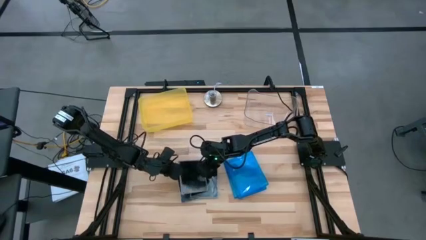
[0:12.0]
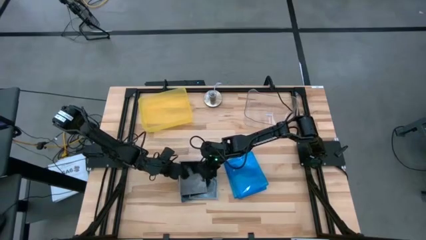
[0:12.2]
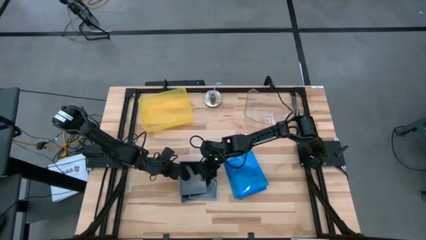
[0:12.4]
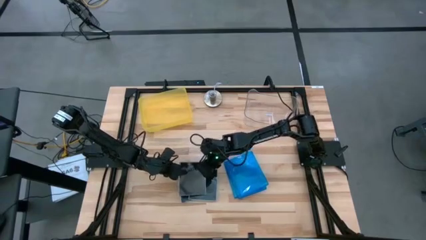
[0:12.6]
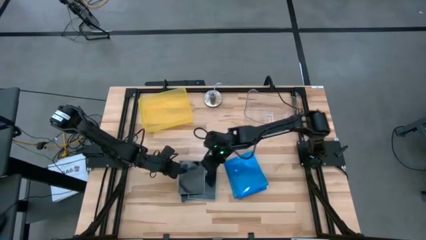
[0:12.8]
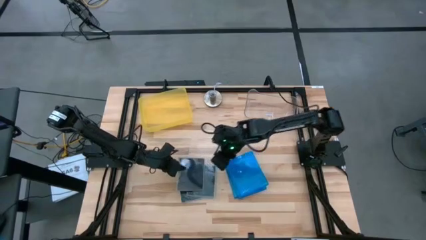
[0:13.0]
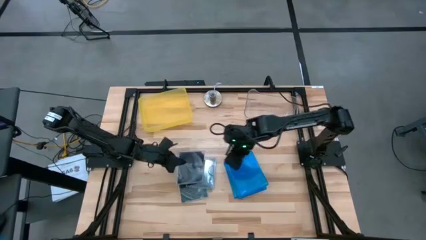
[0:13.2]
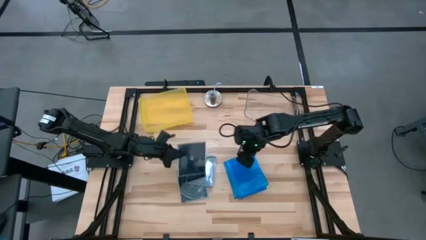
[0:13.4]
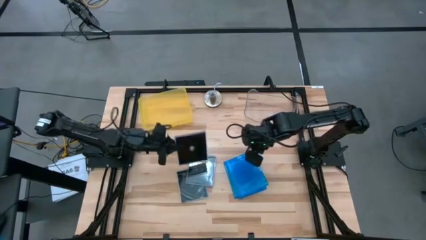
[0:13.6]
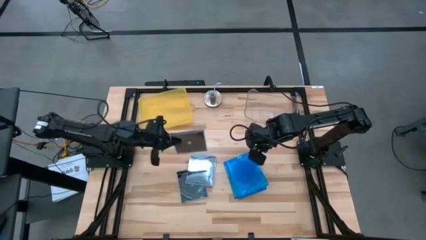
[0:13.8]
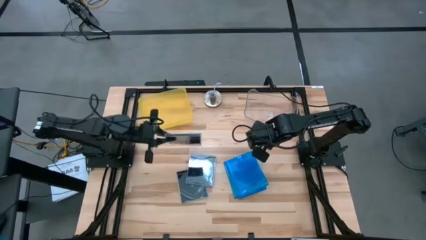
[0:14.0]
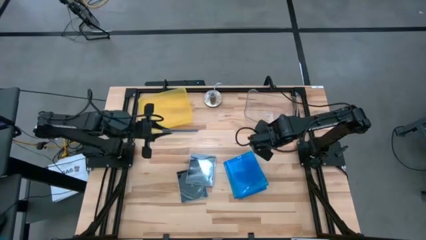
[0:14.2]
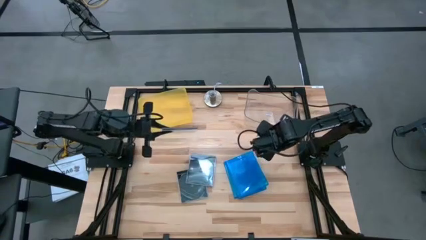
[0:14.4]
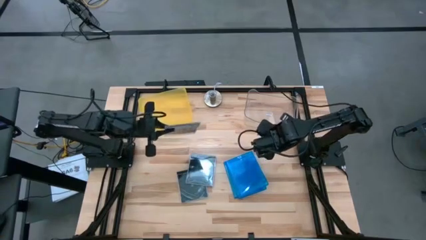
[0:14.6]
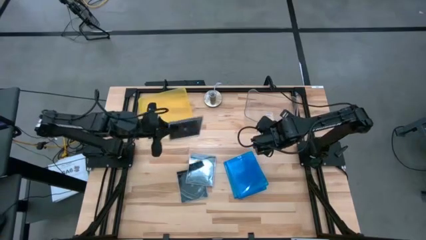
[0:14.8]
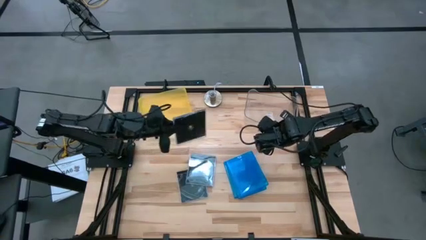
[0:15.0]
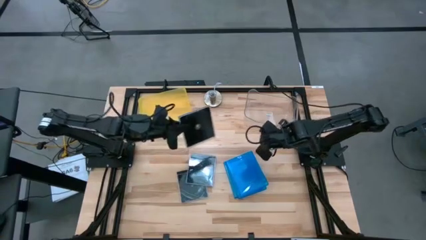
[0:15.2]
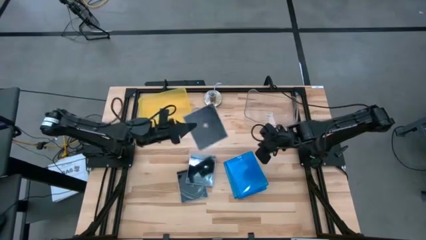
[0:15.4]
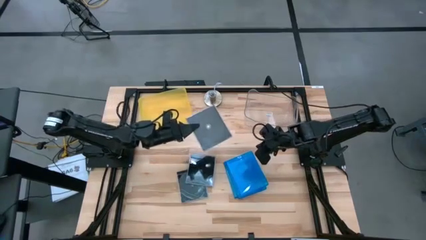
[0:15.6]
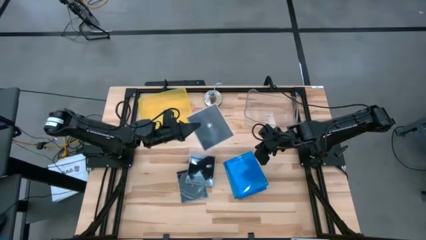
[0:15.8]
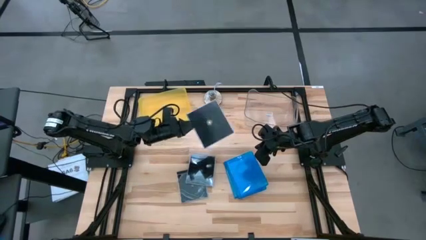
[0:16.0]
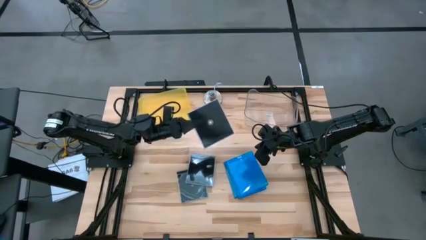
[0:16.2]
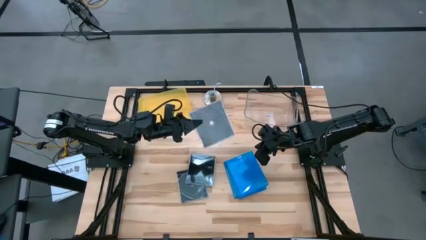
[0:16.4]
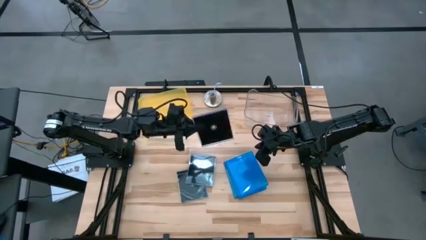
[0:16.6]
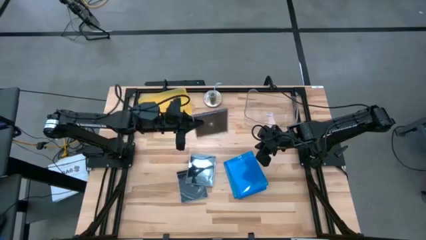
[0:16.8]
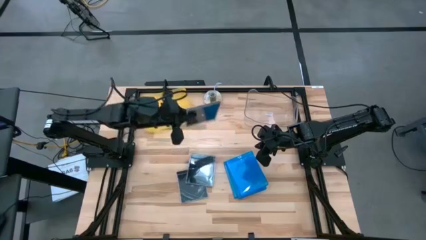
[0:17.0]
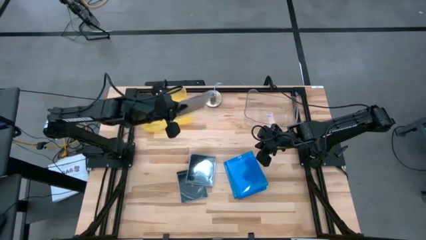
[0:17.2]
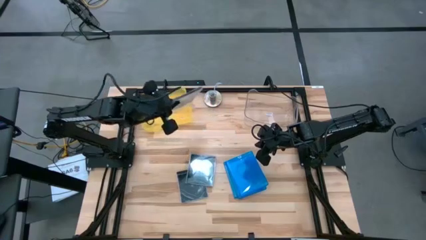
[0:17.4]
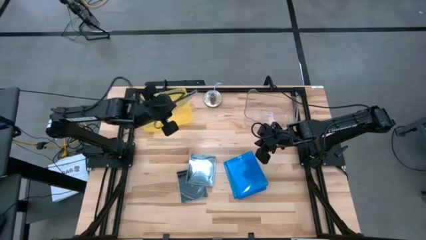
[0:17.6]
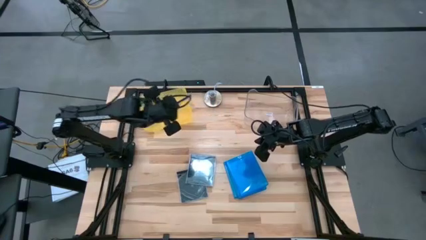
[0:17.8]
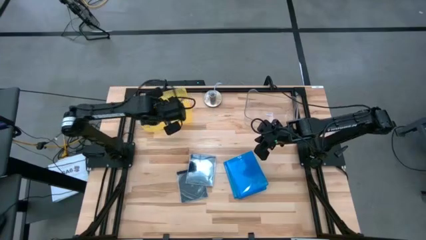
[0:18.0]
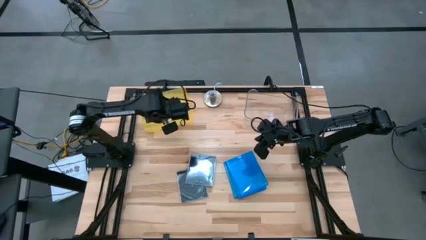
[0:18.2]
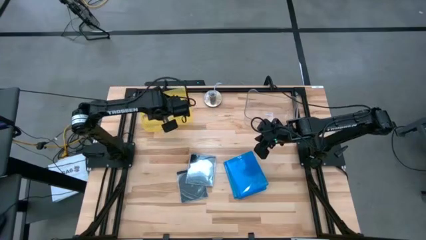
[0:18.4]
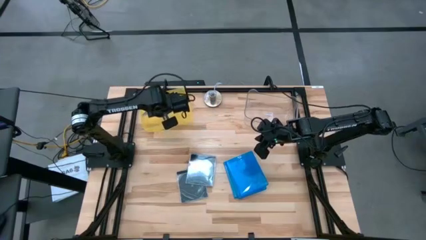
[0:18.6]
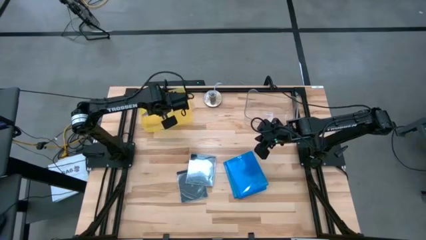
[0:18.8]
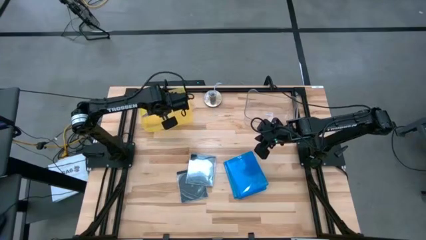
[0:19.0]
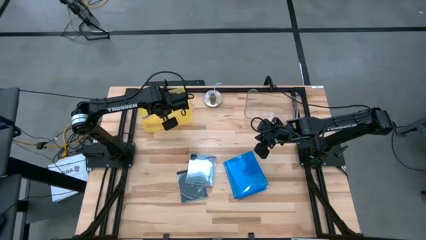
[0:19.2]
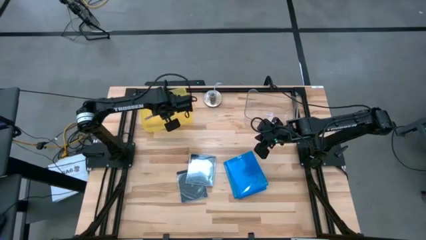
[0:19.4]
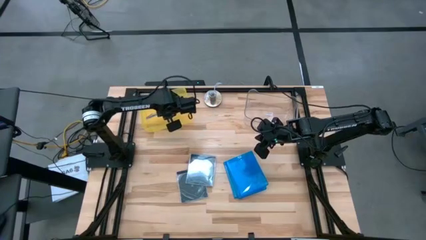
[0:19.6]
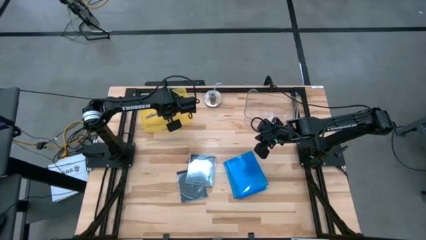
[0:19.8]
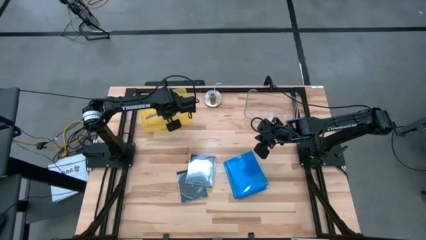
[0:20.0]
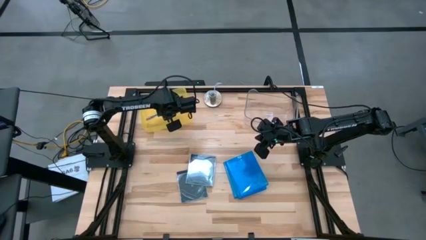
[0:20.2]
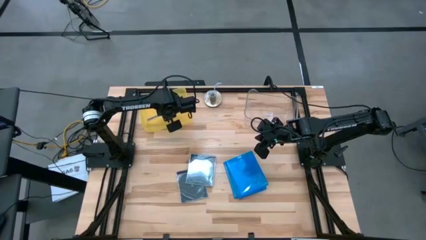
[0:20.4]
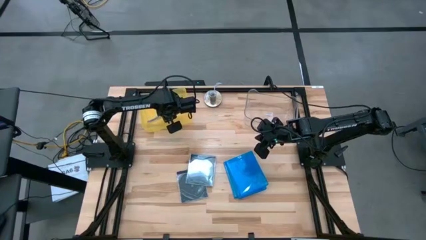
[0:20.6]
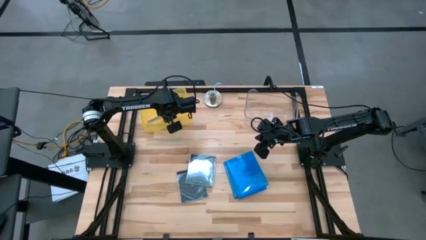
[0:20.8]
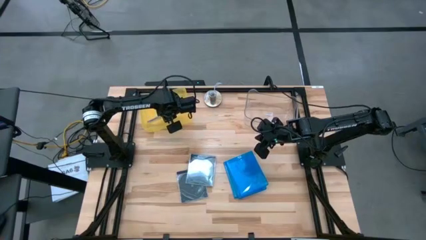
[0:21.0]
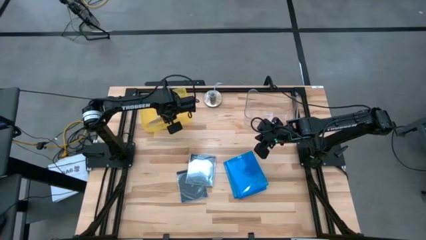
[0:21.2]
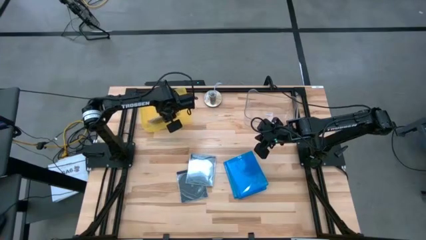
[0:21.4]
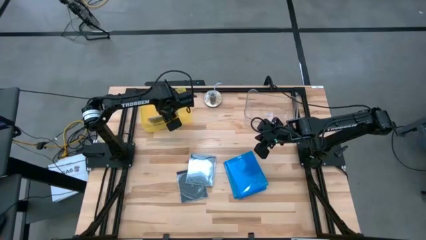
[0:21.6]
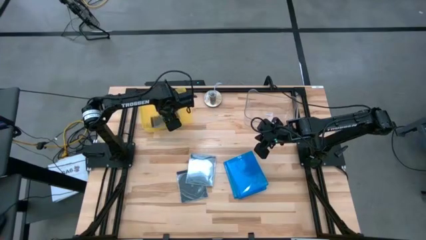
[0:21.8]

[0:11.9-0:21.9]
Task: Pick & place jewel cases by type
Put the black CD case into the yellow bin

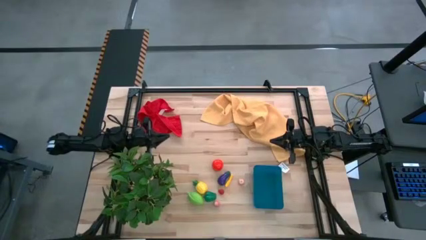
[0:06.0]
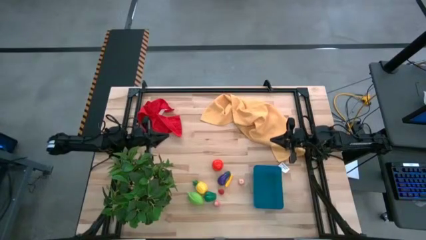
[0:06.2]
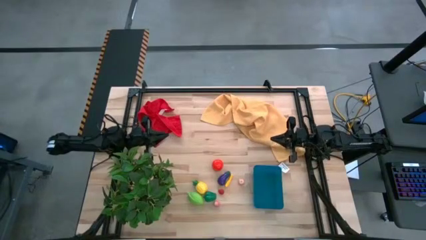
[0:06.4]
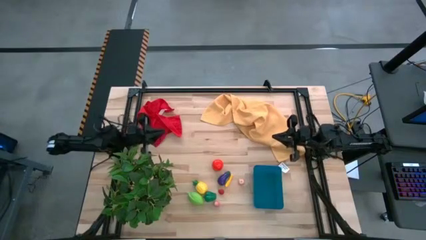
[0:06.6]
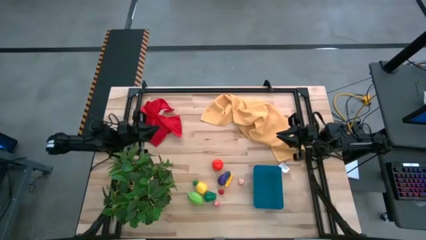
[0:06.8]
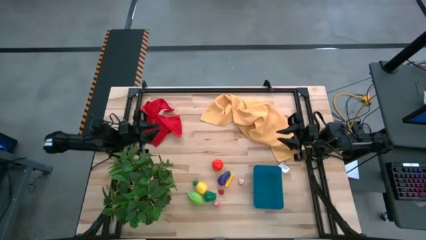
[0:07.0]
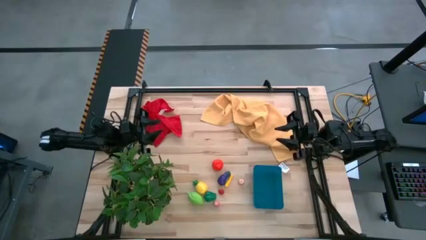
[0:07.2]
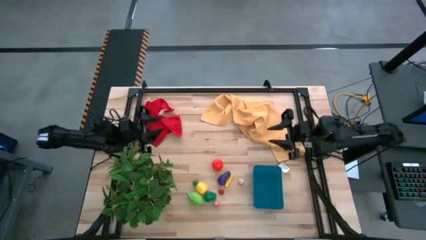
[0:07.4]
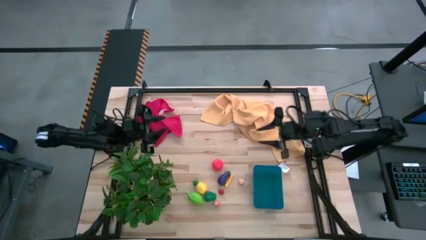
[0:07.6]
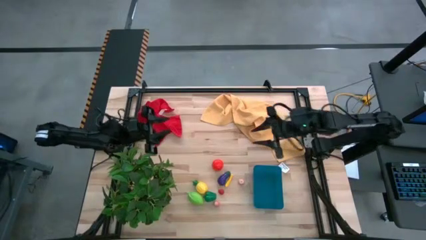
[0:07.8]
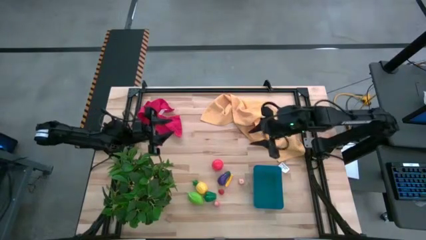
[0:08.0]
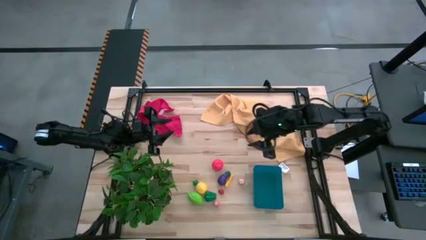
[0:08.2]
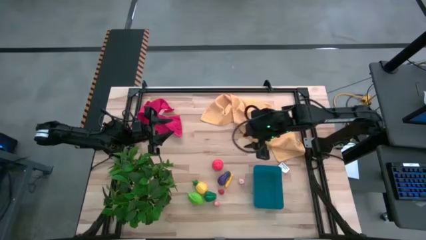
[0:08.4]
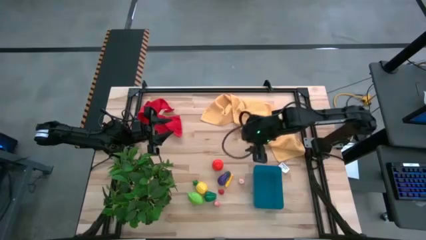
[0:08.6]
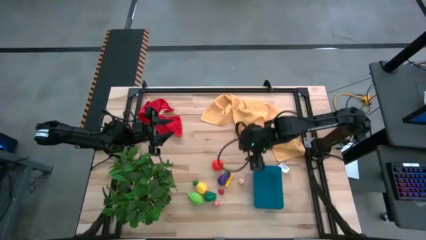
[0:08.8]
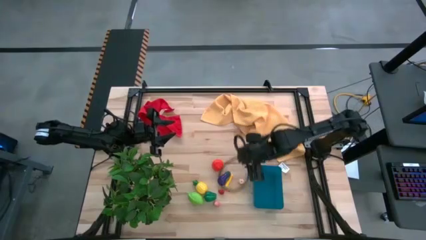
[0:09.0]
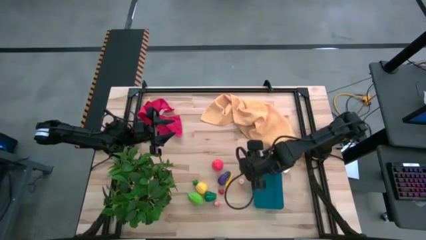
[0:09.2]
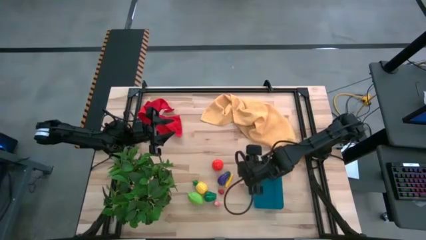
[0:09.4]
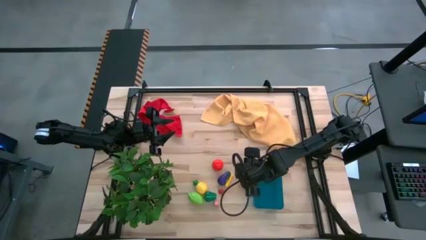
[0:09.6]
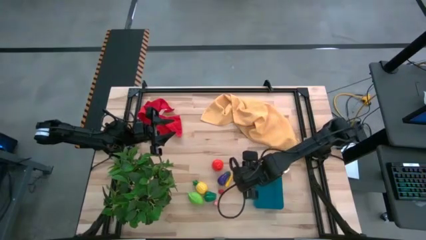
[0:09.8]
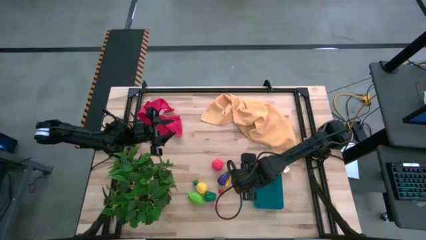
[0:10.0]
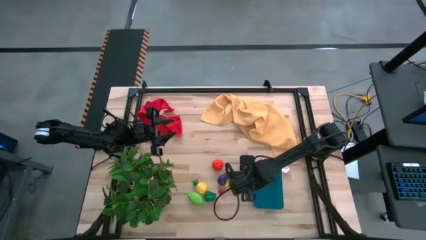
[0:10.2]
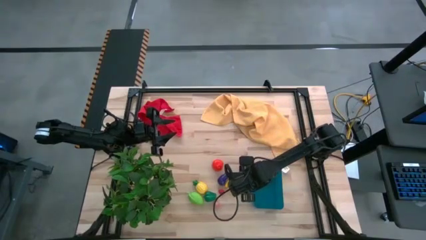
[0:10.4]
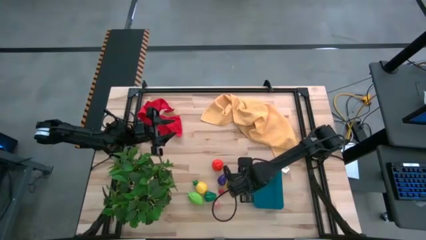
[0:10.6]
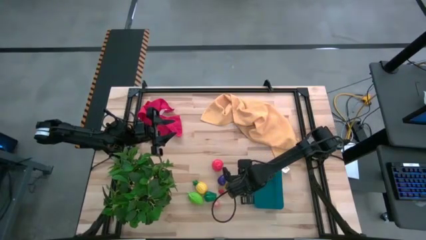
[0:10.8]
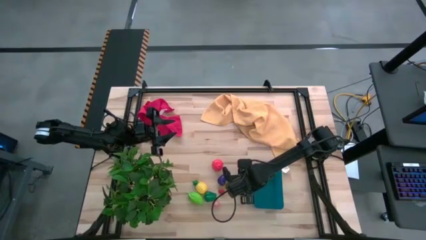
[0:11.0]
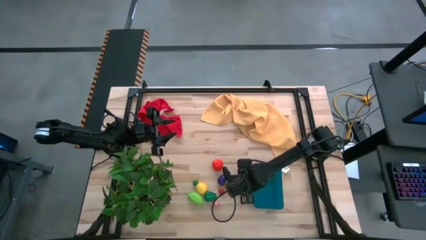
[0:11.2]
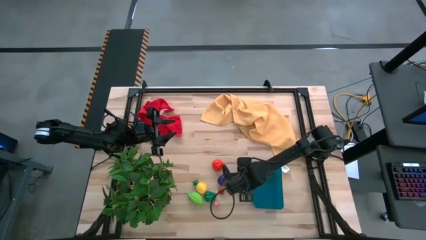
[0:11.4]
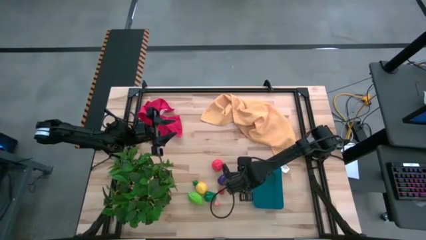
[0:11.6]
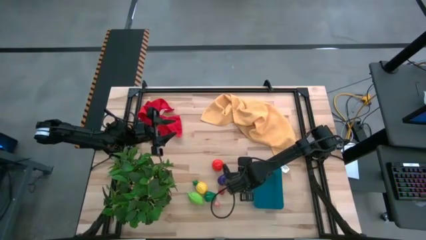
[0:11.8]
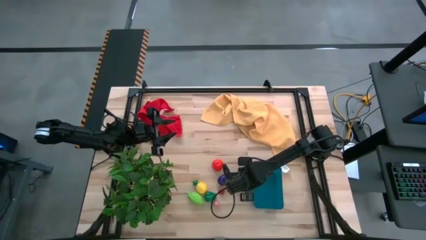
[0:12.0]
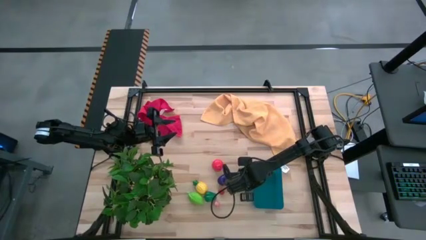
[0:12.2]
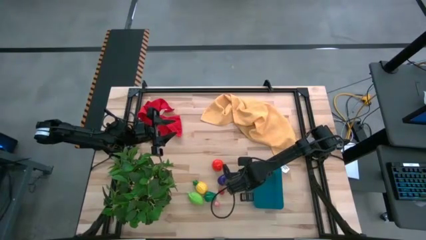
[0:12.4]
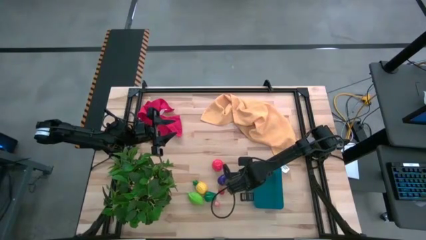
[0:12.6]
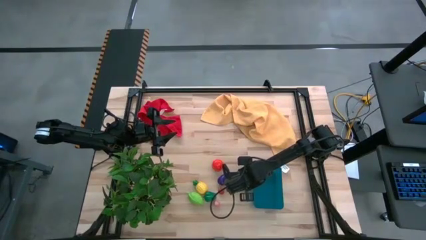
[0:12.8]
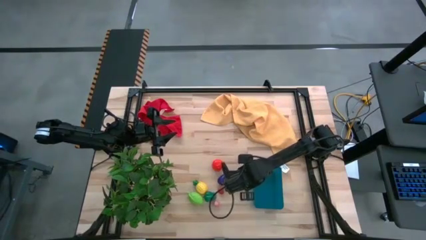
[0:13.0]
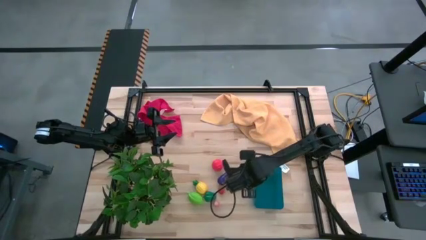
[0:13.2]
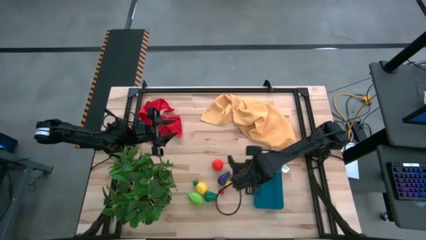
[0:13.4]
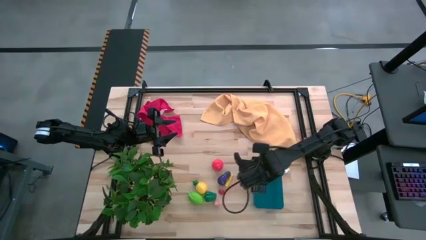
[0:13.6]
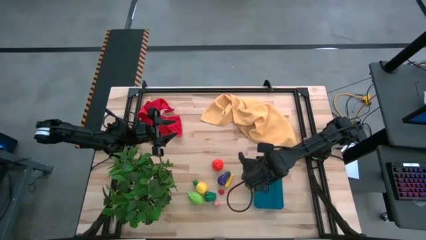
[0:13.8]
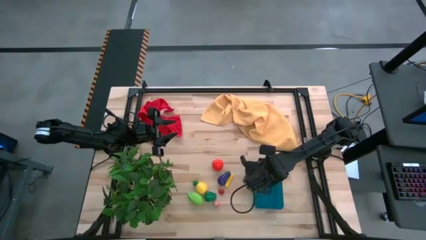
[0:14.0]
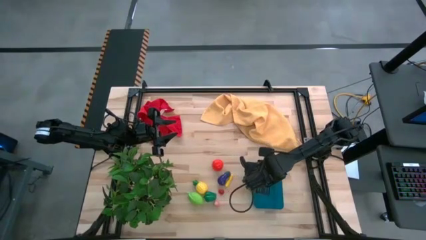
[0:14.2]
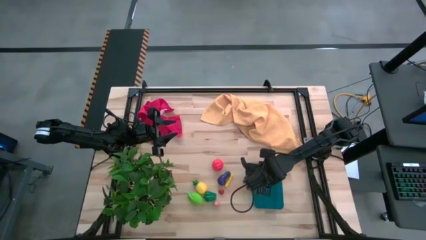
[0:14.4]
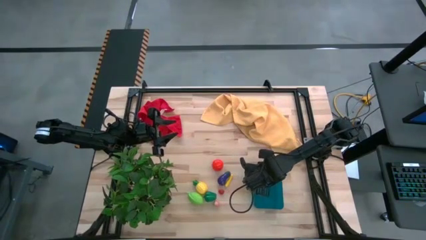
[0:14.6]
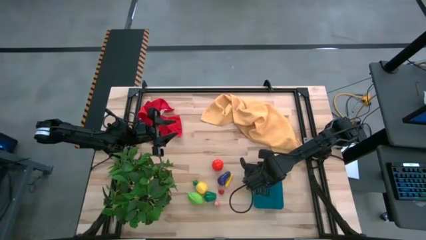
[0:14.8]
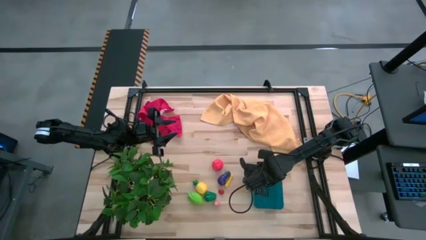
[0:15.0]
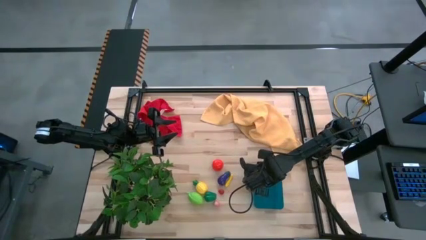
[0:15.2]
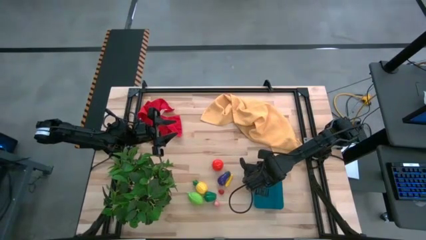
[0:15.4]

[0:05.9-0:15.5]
Task: Pick and placing Produce into tupperware
Put the top pink peach into the blue bin
